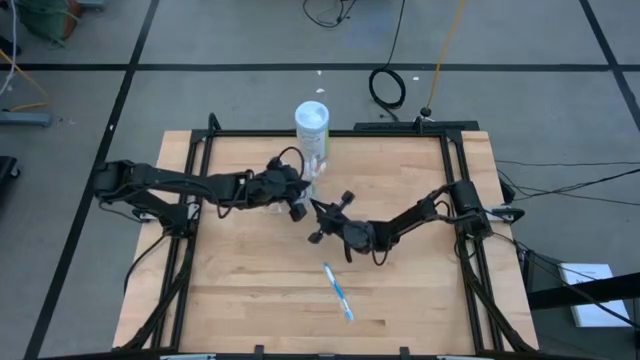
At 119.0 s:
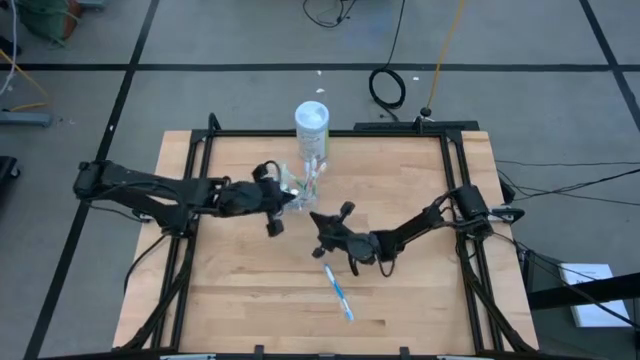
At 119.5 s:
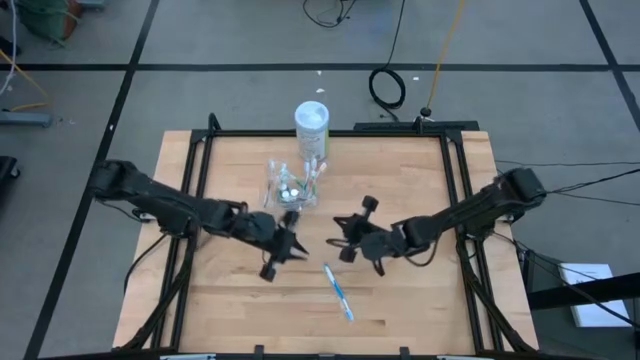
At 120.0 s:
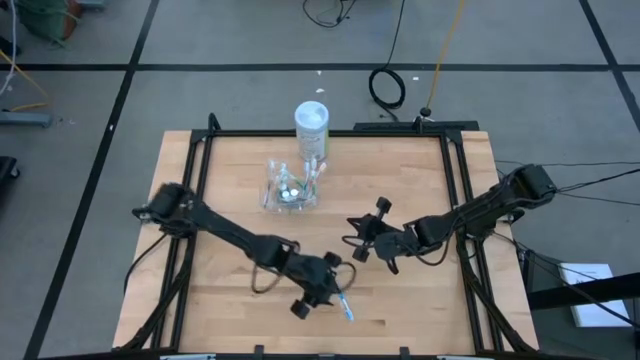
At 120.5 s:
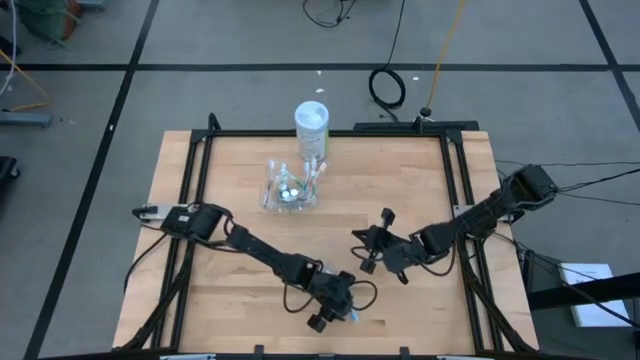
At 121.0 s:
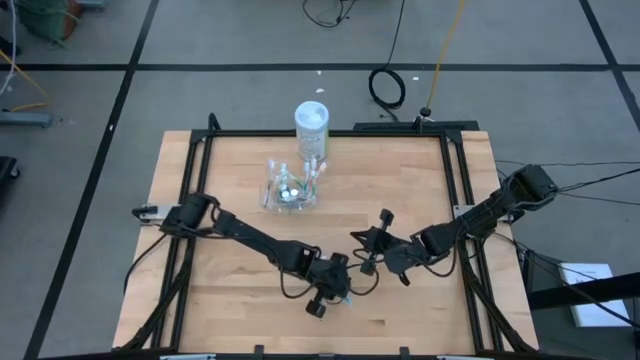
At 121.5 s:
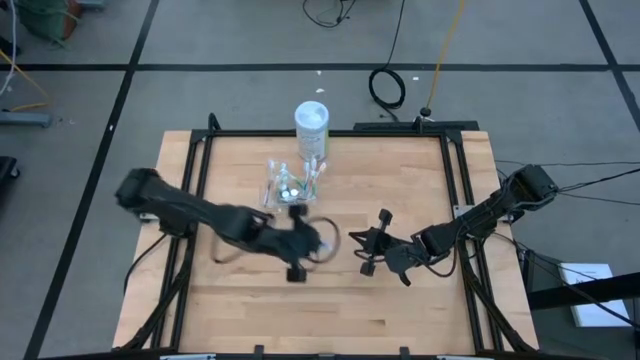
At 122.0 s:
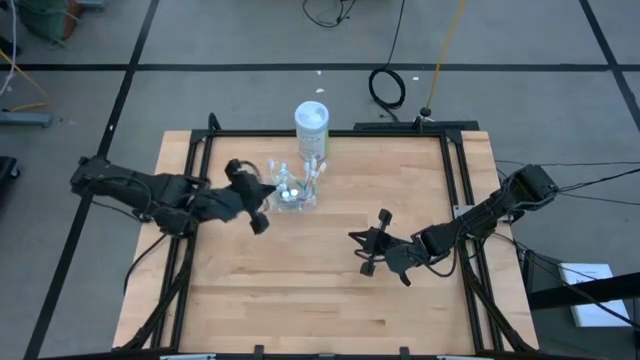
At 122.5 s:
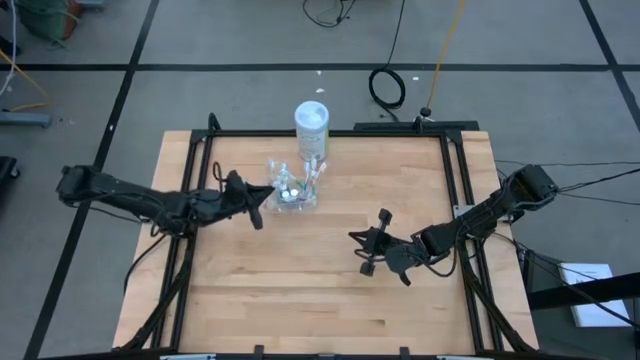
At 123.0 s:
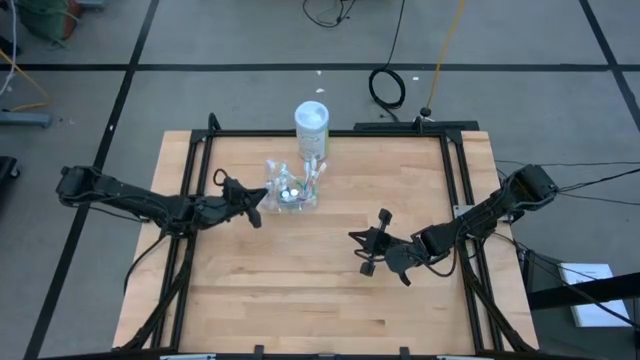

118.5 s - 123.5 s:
Task: Pick & Place toothbrushing station
Put the blue toothbrush into the transparent organizer

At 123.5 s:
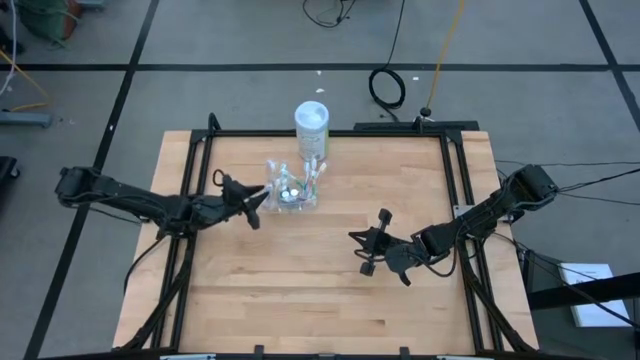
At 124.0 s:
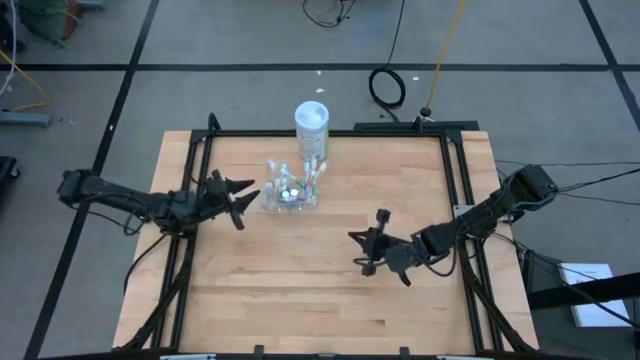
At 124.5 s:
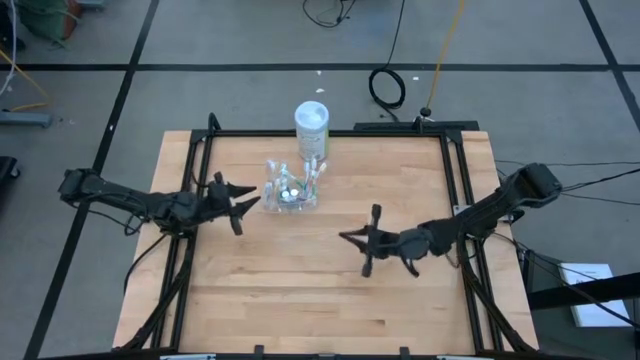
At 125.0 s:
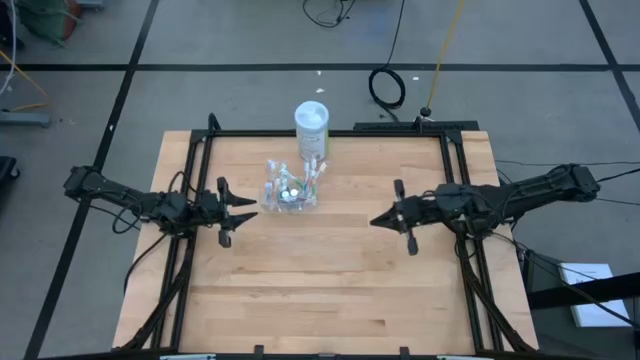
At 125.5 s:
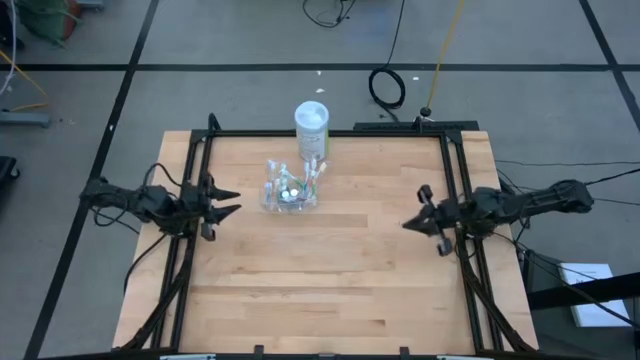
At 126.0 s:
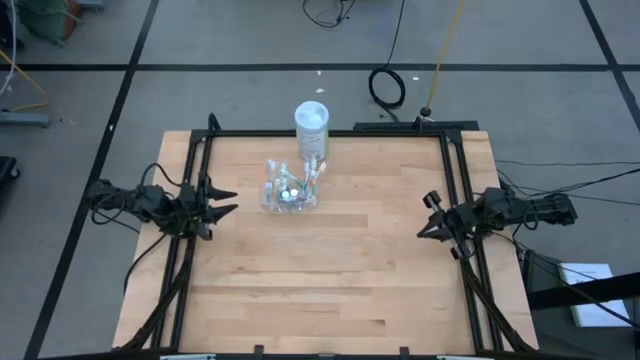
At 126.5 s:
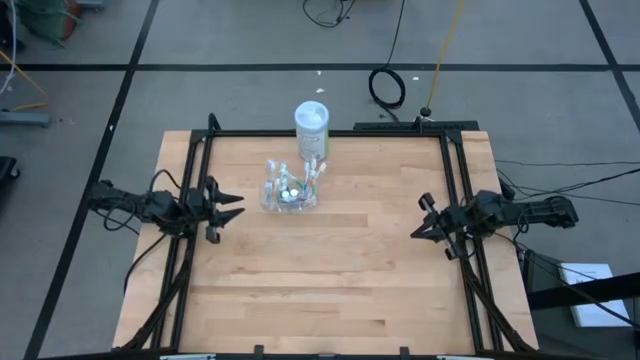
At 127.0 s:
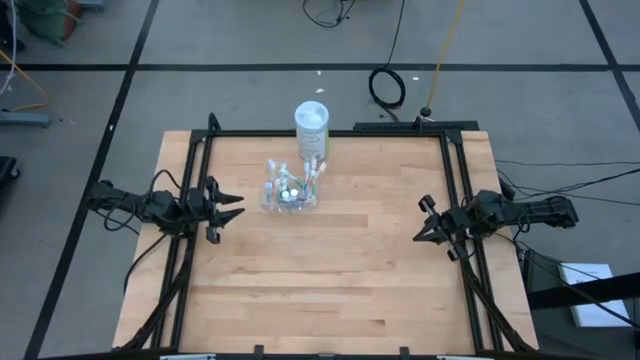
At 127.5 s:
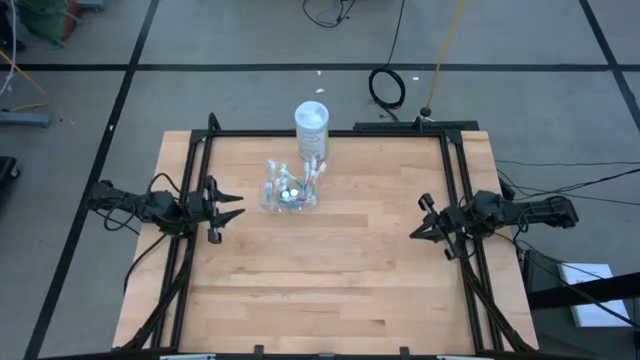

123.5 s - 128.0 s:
Return to Home Position

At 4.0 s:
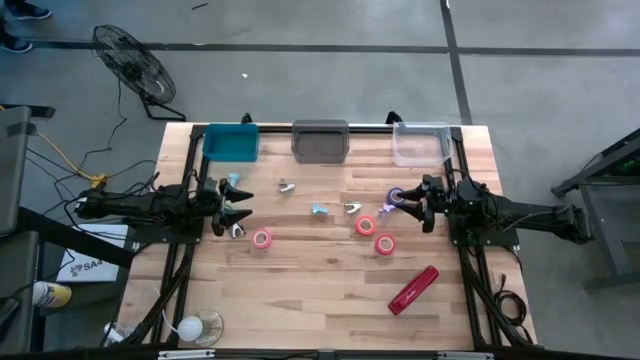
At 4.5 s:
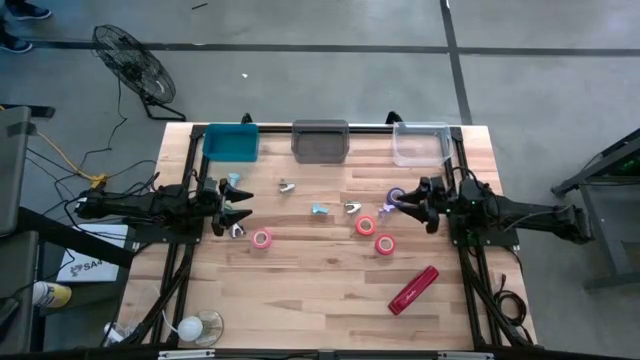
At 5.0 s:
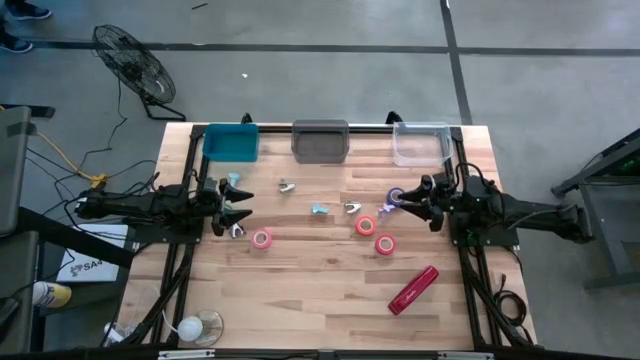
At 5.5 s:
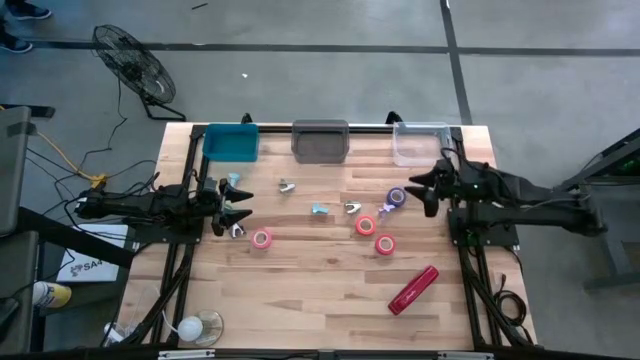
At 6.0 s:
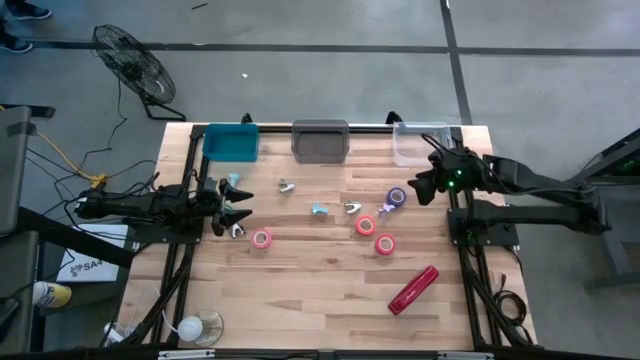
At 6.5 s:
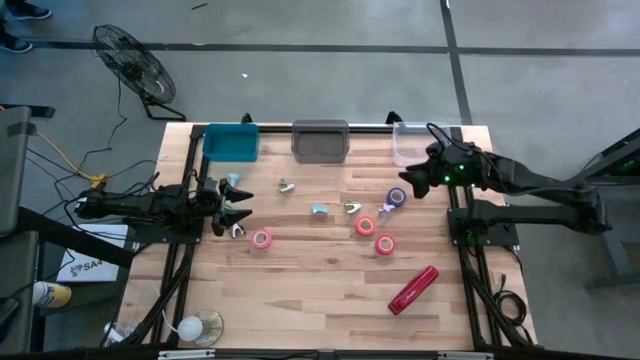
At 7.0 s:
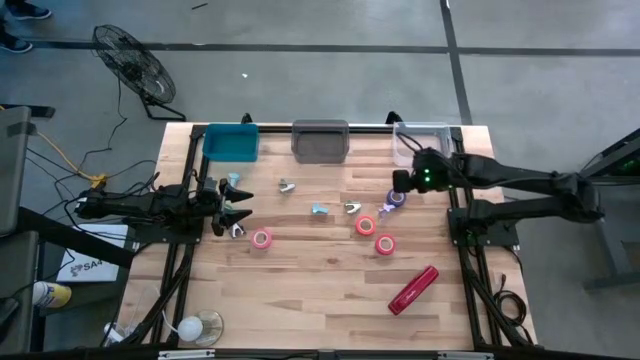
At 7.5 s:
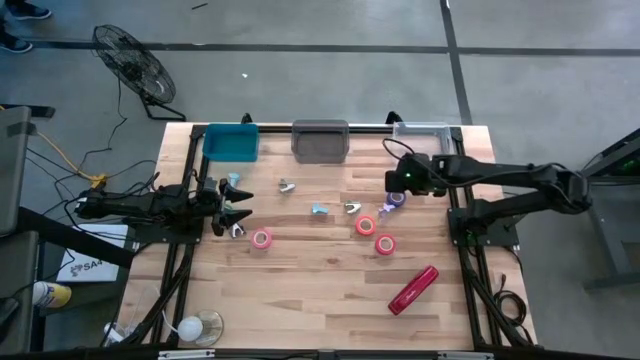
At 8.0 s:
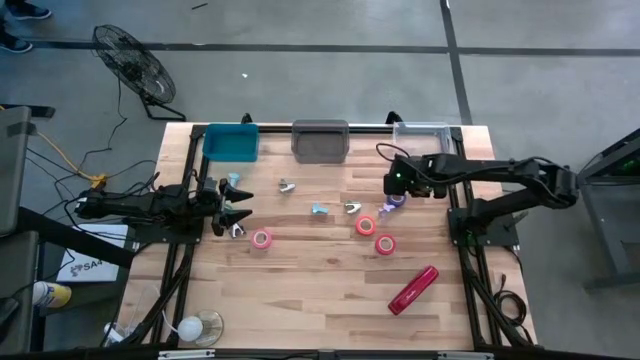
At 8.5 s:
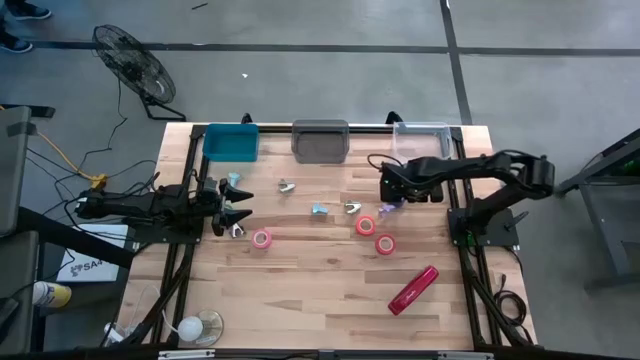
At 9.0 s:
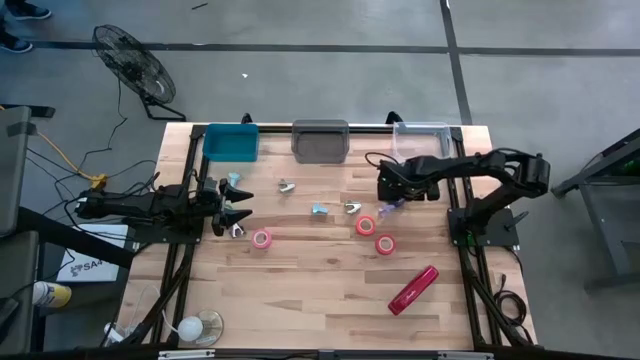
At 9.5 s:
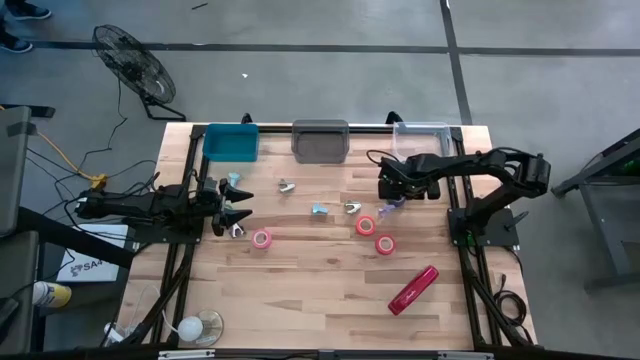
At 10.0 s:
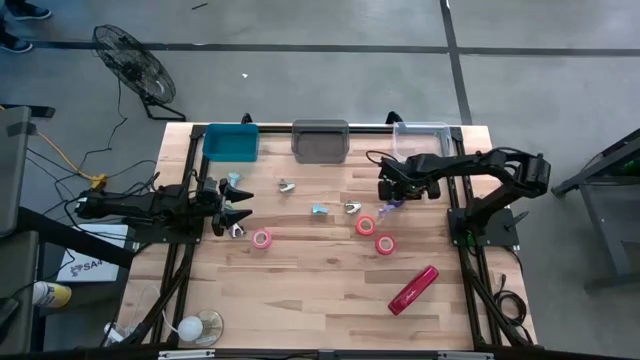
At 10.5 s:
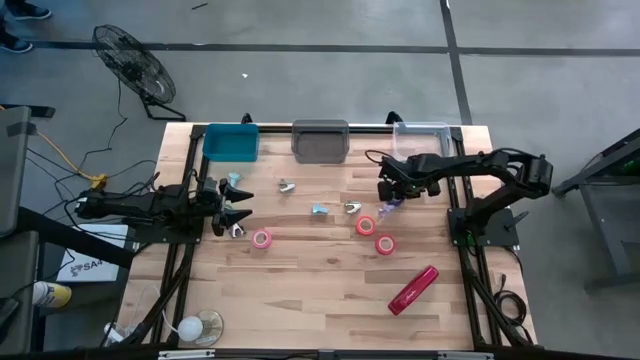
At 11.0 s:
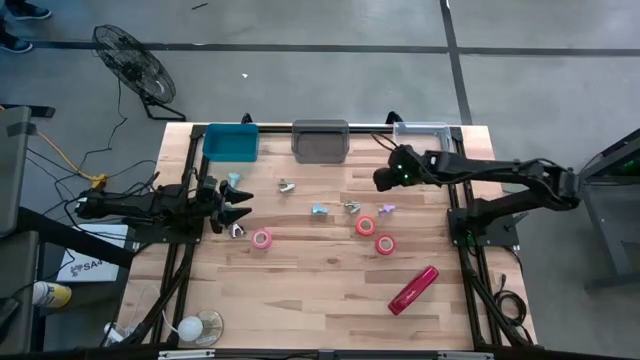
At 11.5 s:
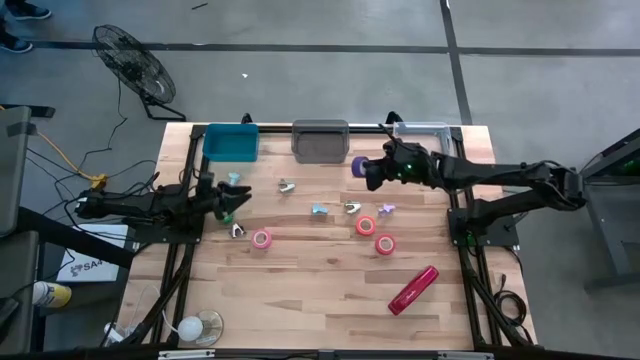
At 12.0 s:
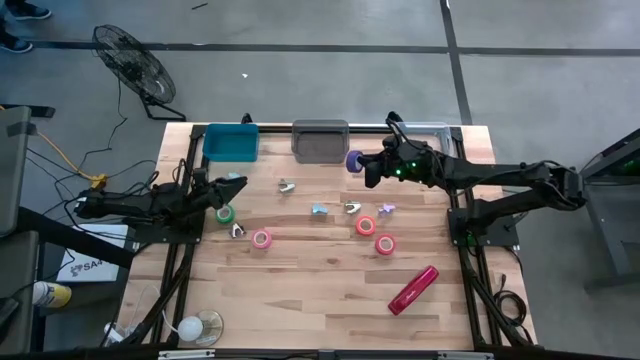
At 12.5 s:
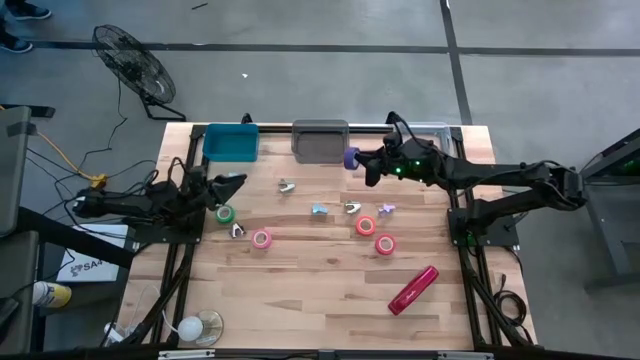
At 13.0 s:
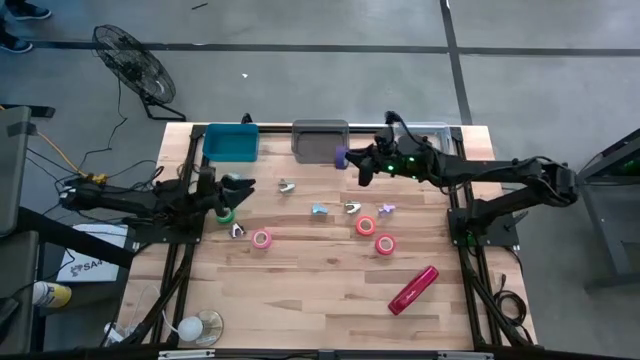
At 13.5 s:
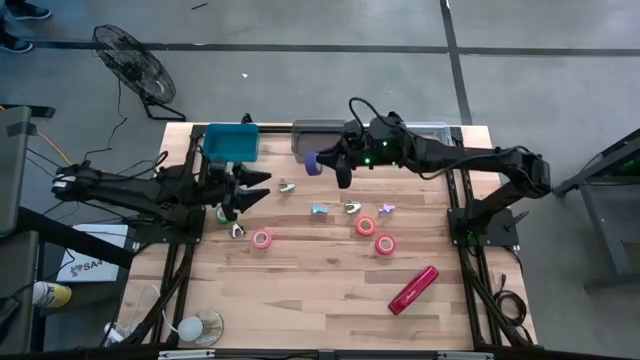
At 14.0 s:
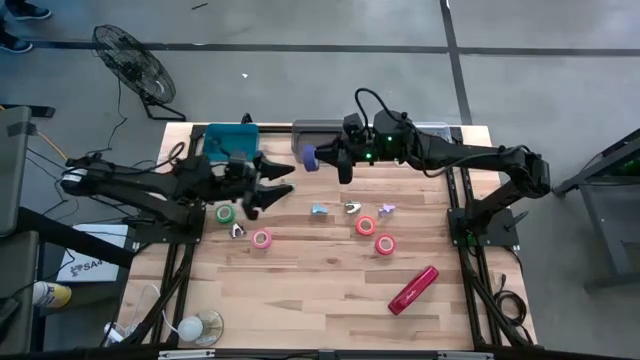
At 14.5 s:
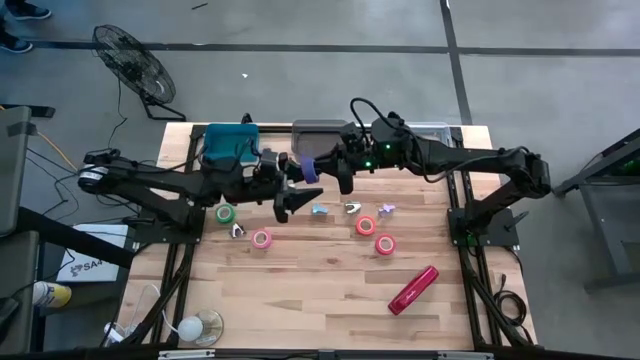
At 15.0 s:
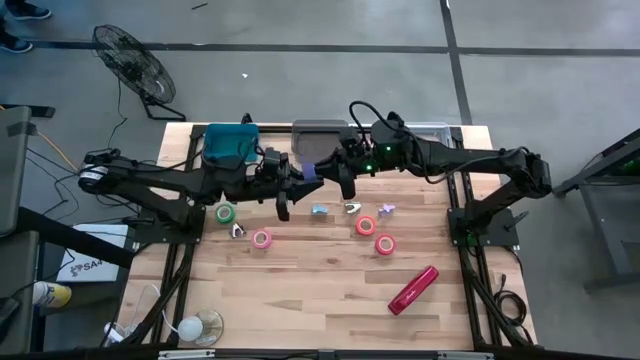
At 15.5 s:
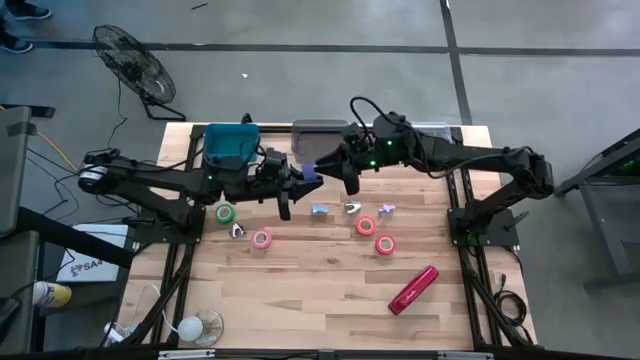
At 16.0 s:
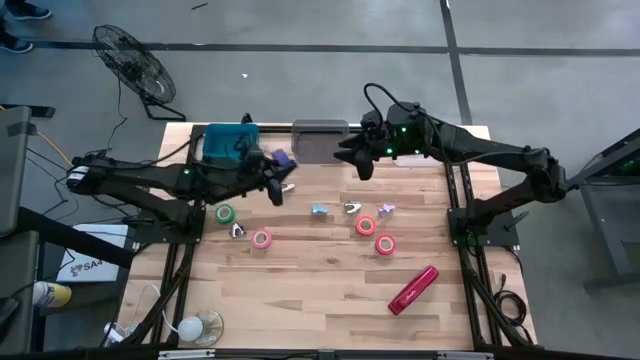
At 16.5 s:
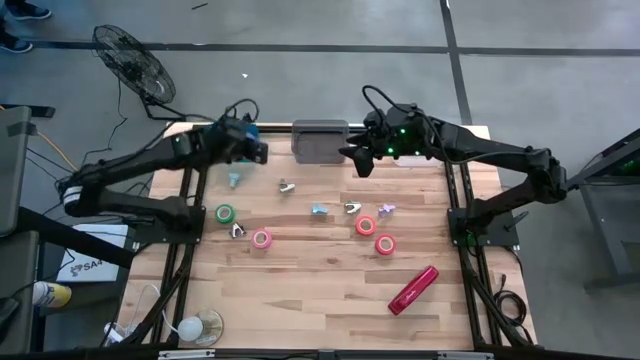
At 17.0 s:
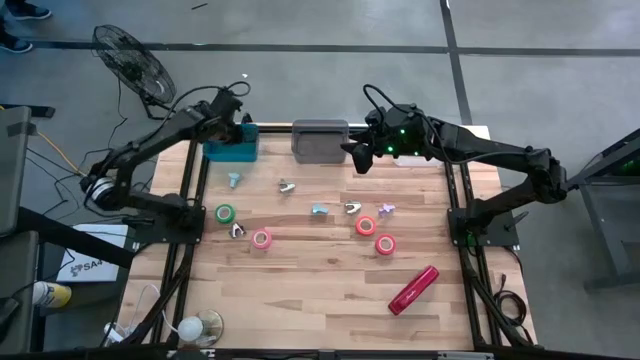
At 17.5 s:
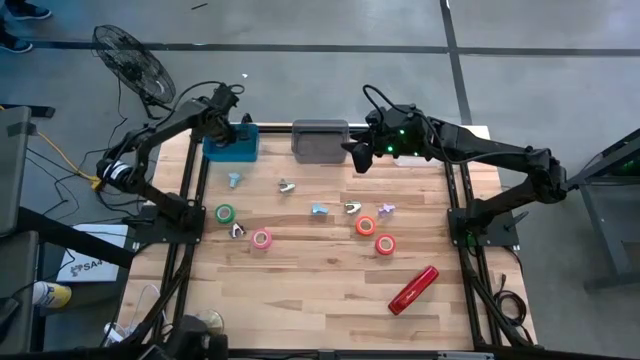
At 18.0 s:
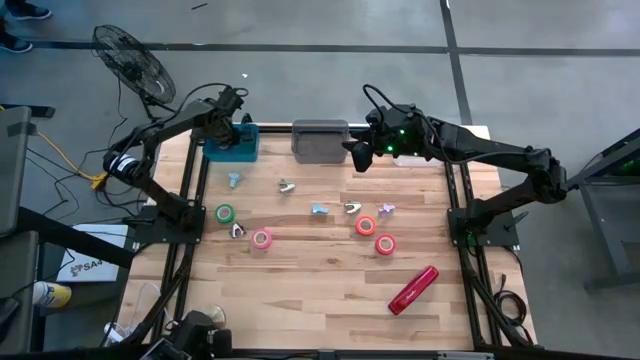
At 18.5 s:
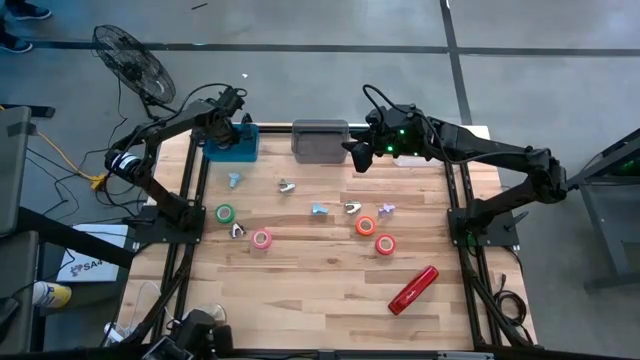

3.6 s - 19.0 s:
Task: Pick and place Stapler, Stapler remover, tape
Put the violet tape into the blue bin
